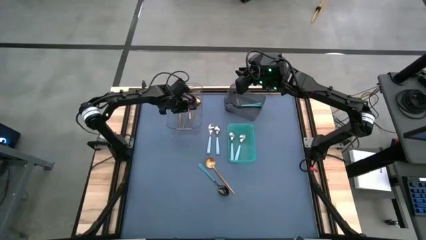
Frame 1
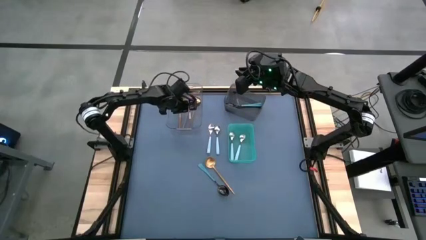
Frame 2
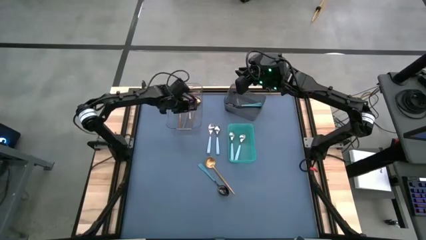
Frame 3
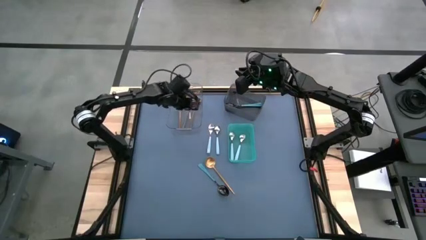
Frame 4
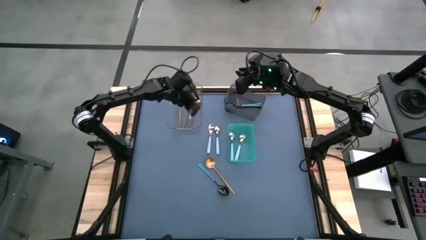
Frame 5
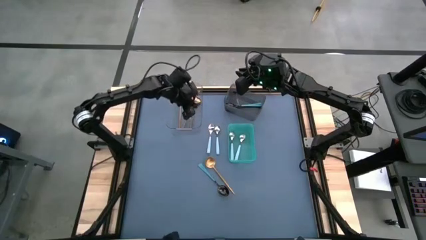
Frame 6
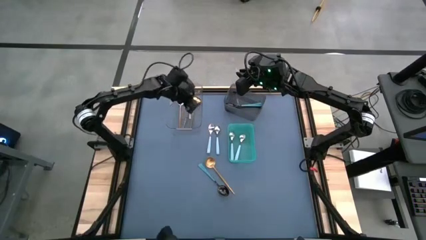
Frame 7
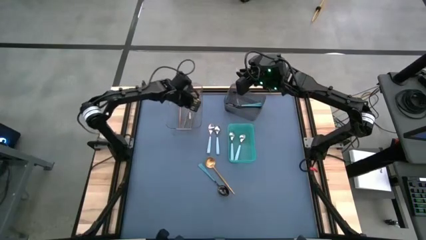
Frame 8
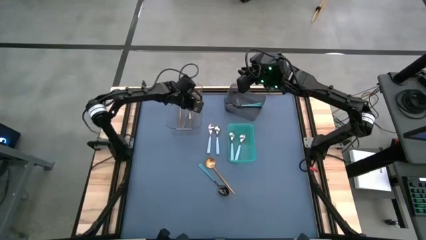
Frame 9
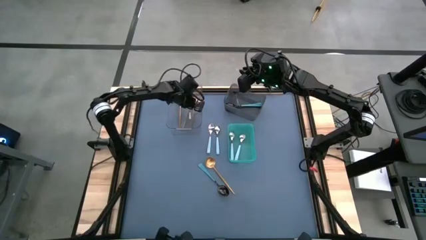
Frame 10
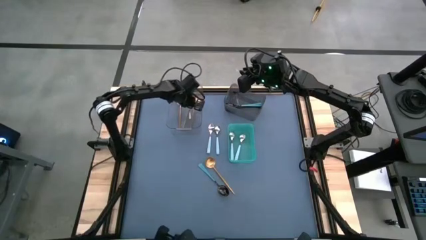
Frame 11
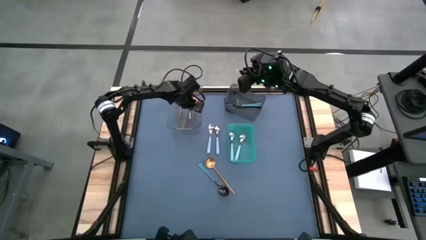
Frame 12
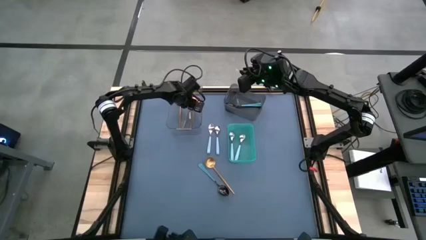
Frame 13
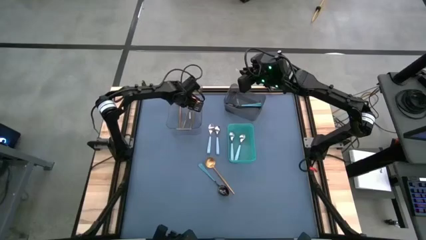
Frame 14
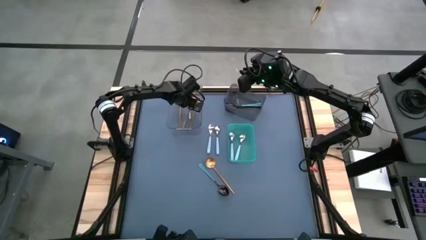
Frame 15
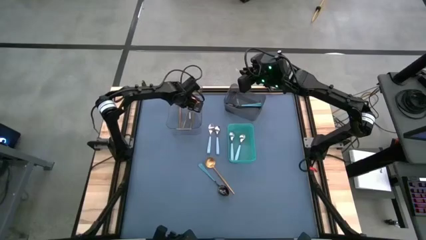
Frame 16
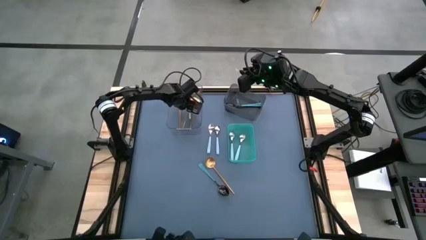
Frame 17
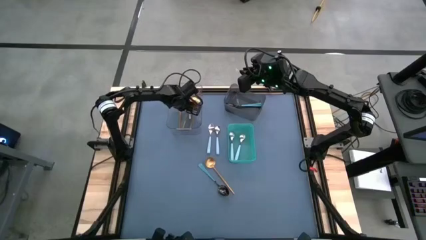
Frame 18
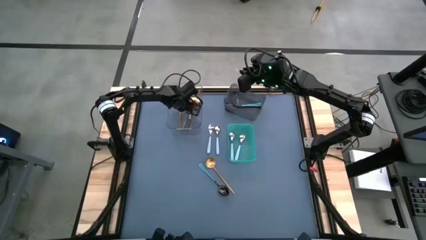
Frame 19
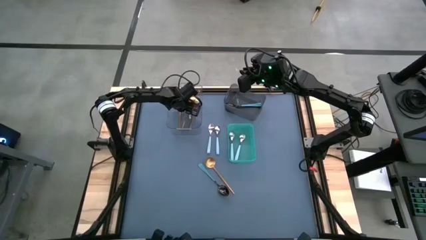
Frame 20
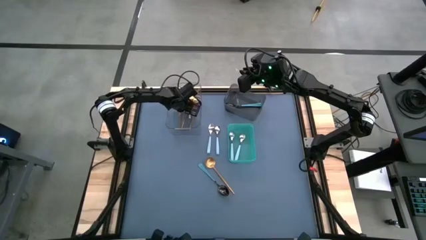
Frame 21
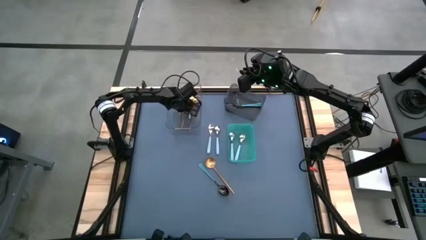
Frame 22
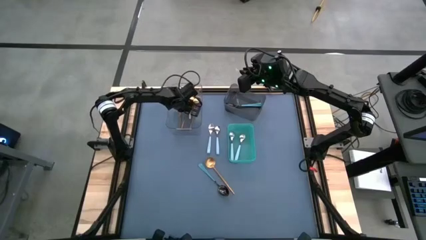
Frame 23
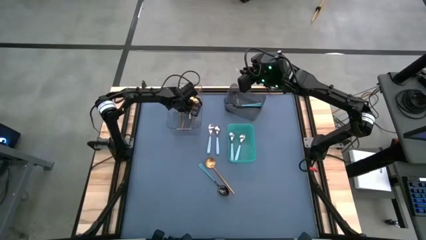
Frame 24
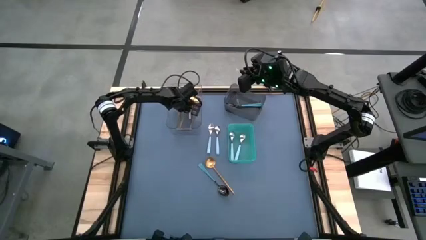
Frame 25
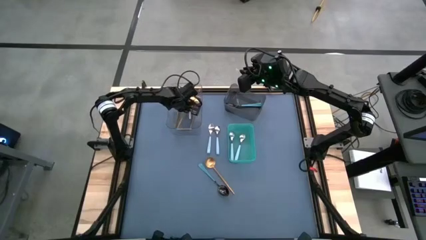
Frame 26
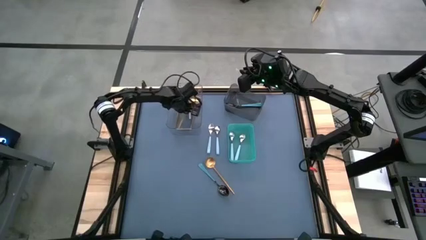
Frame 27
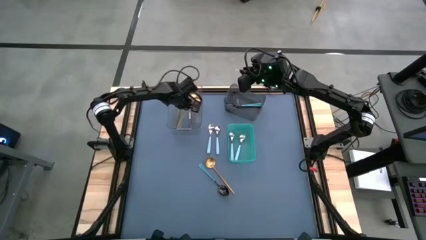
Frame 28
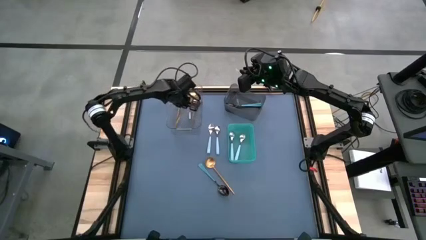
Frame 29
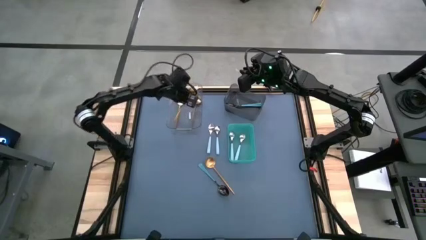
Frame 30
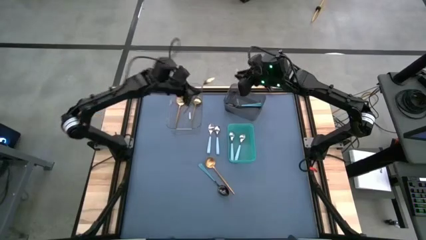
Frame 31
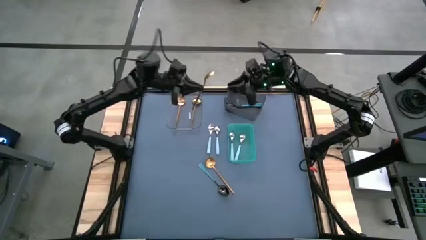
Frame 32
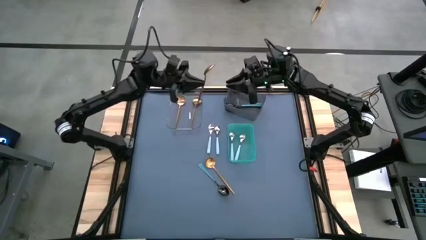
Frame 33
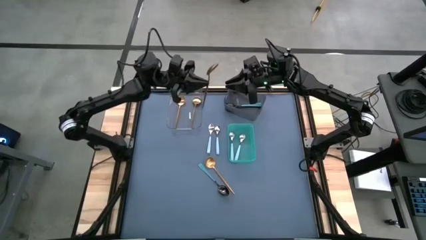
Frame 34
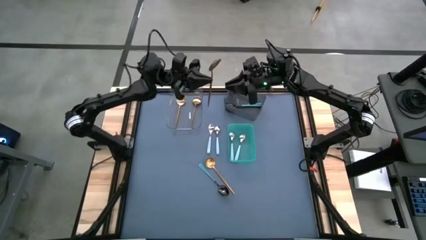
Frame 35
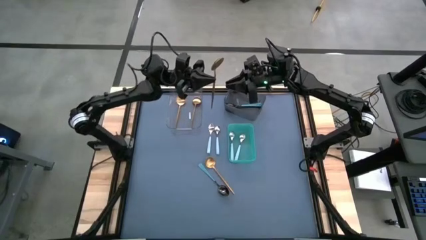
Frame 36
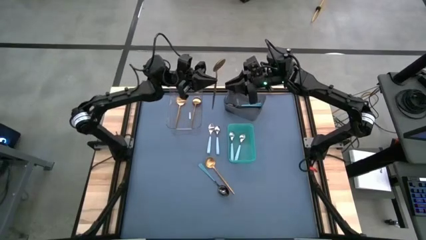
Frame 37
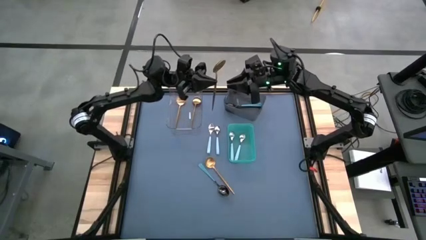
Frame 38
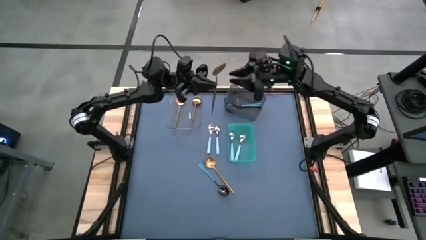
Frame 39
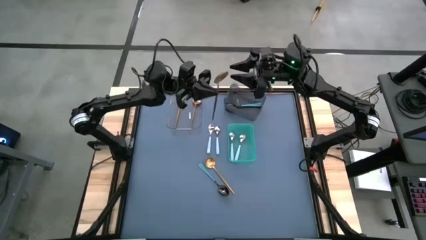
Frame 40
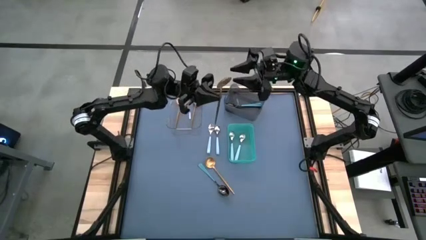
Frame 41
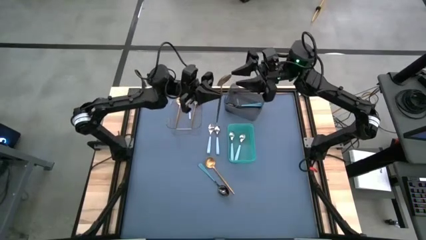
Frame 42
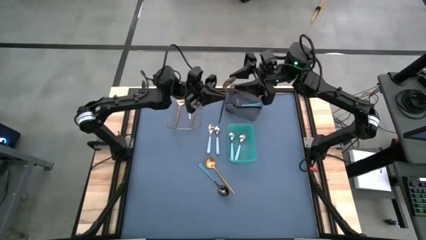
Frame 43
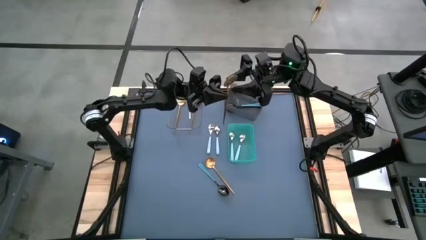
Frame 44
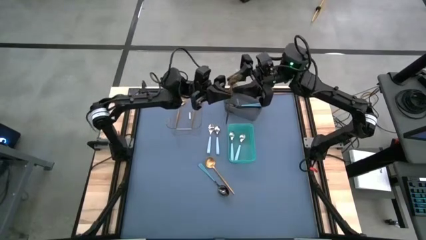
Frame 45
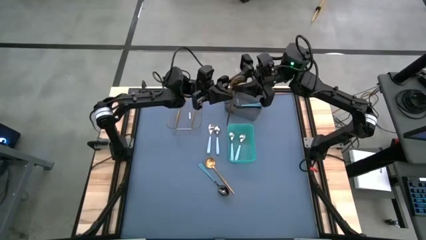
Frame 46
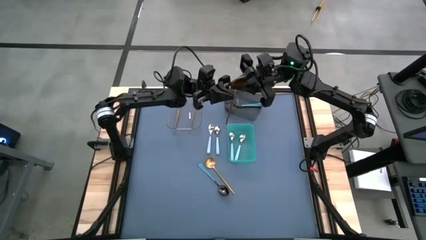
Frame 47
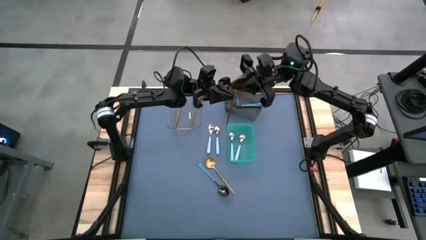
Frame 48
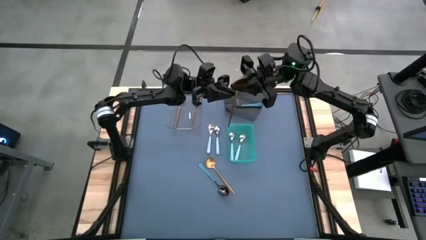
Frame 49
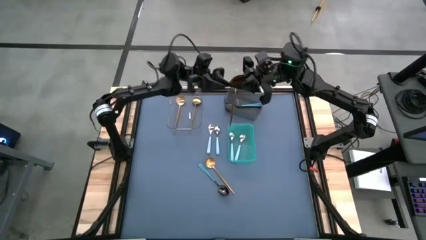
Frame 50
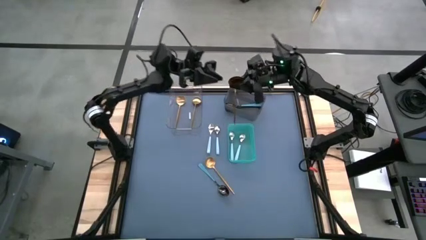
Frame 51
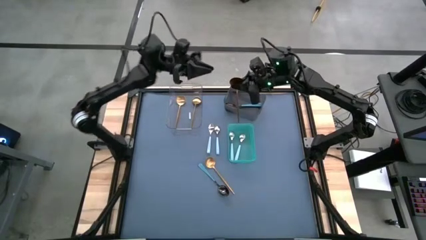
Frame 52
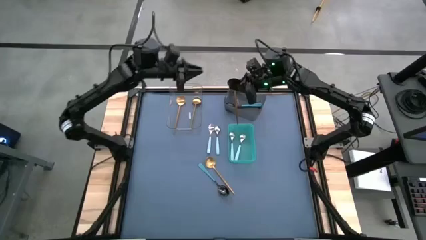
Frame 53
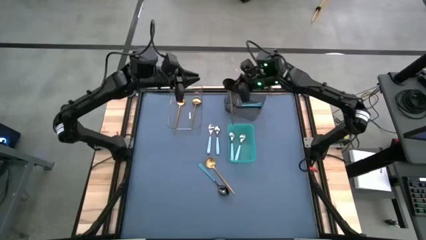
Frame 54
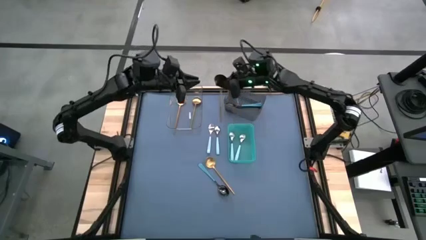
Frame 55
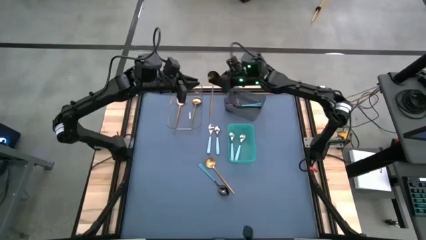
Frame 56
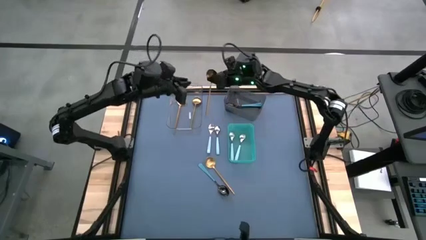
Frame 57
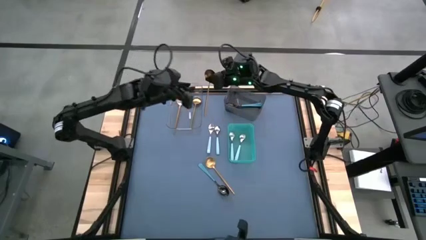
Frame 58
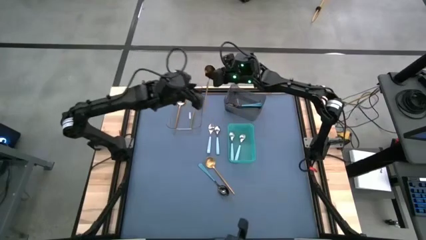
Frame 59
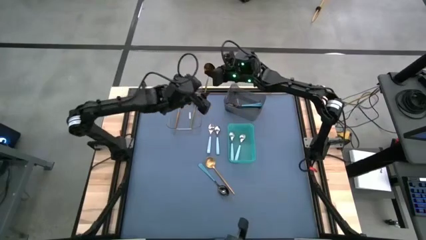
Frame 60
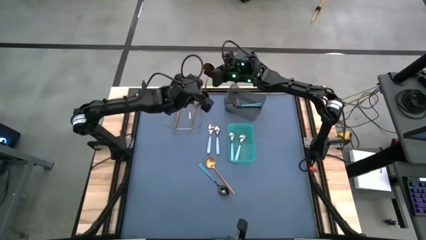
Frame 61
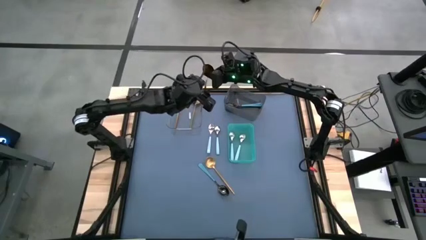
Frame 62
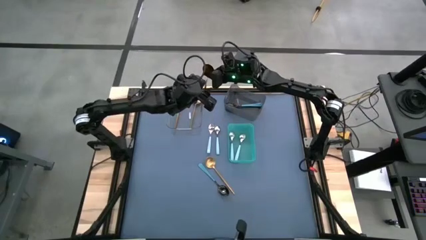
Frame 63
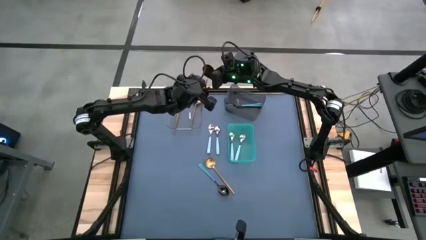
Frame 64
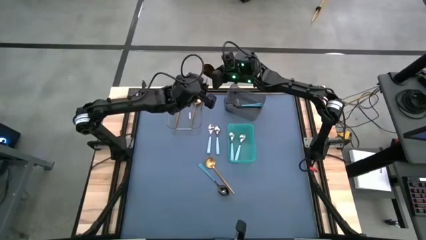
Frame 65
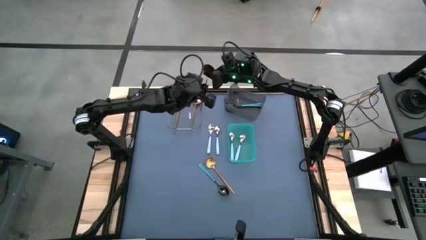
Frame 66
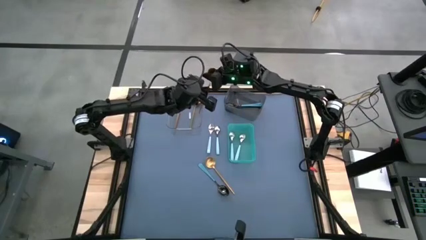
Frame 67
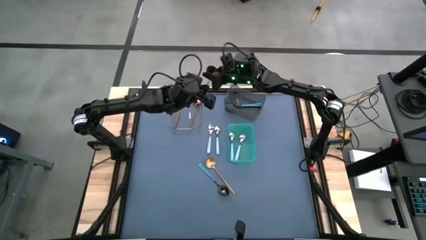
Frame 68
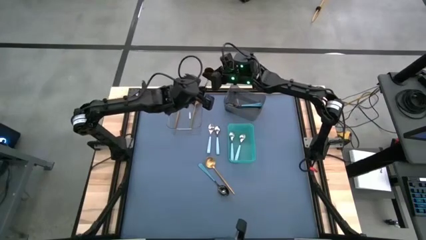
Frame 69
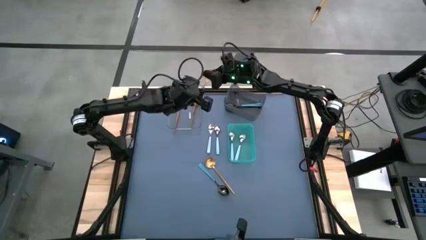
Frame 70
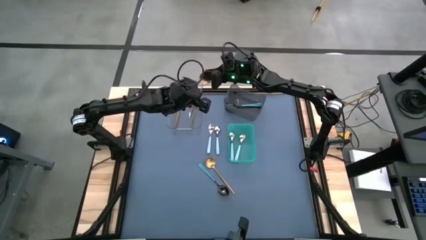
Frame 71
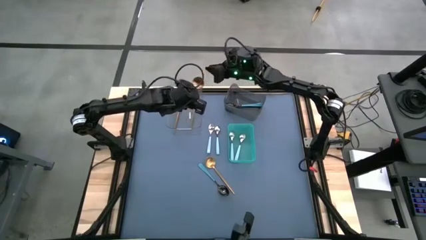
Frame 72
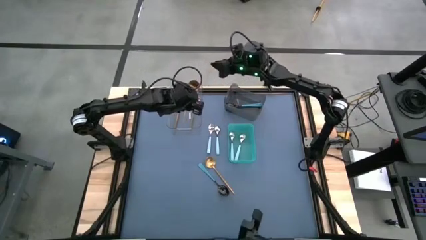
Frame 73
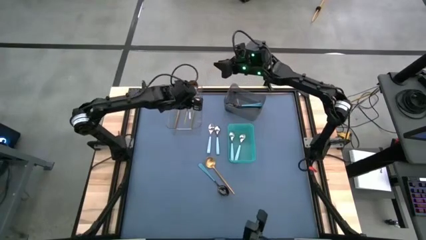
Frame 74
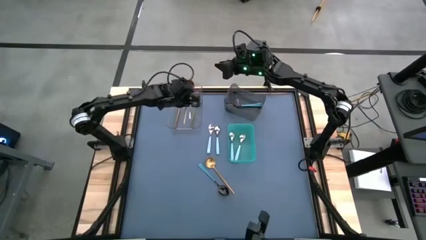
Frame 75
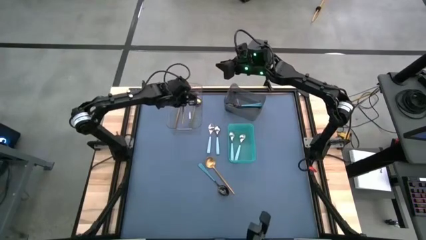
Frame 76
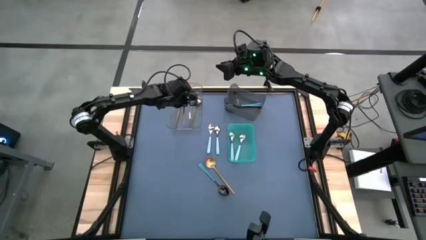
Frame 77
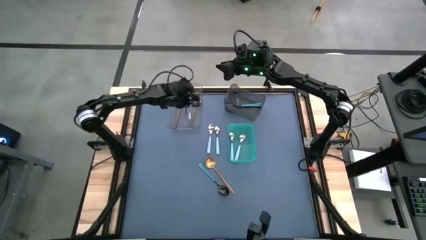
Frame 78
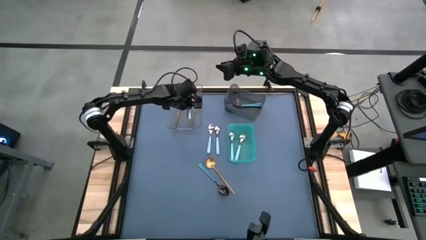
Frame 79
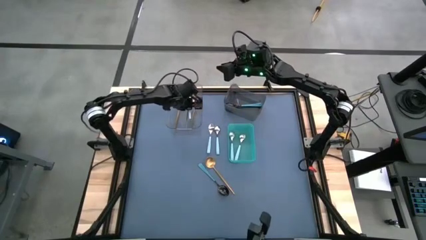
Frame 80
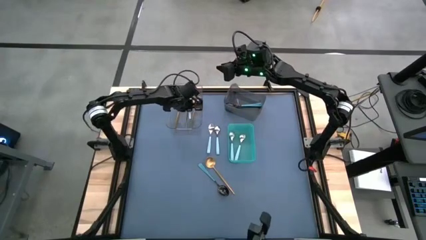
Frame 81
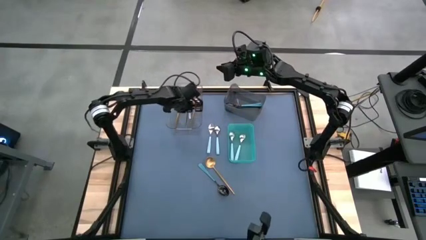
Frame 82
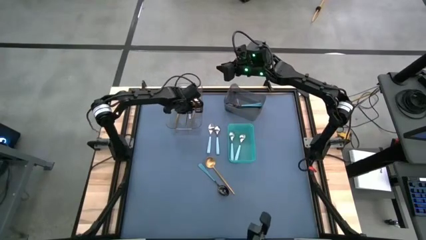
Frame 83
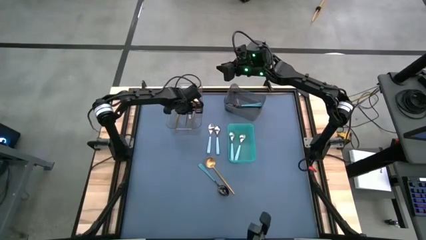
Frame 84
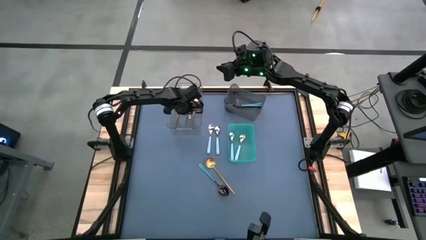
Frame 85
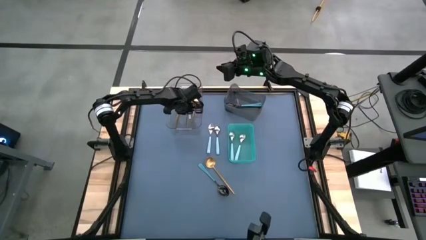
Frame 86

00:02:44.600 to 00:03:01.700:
Task: Sort silverware by color (type)
Put the gold spoon into the transparent bin
